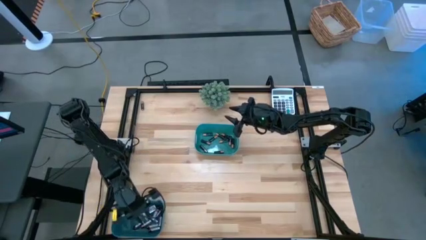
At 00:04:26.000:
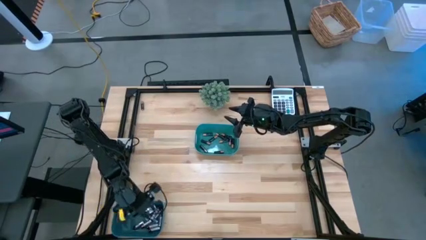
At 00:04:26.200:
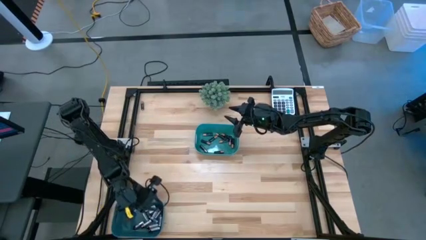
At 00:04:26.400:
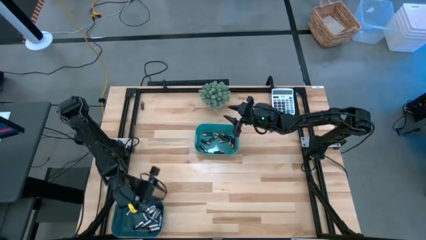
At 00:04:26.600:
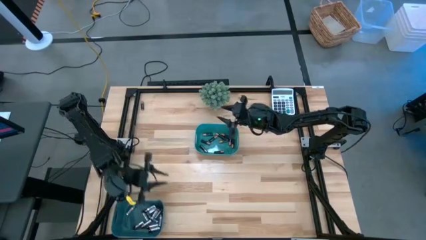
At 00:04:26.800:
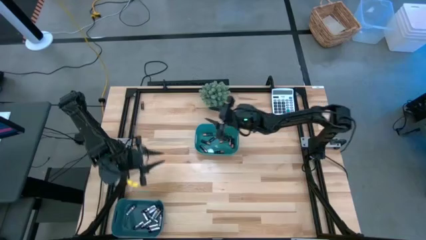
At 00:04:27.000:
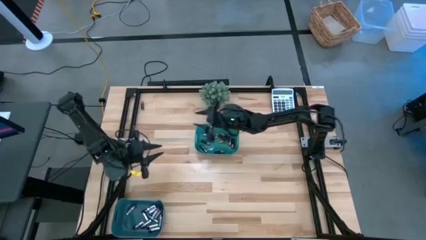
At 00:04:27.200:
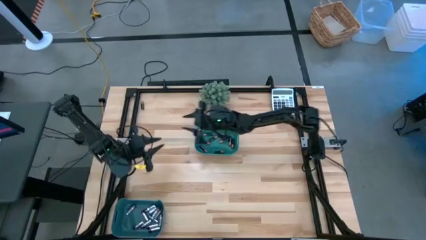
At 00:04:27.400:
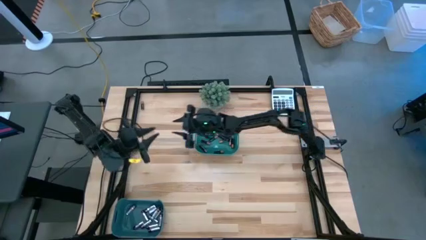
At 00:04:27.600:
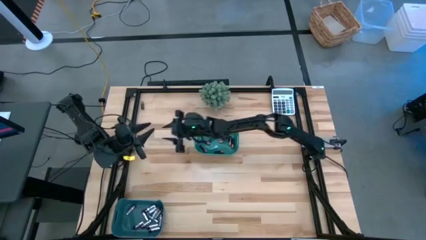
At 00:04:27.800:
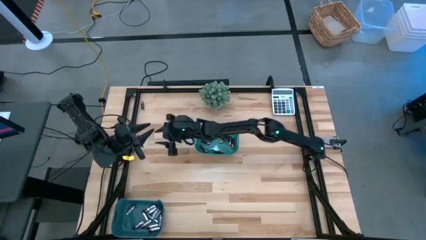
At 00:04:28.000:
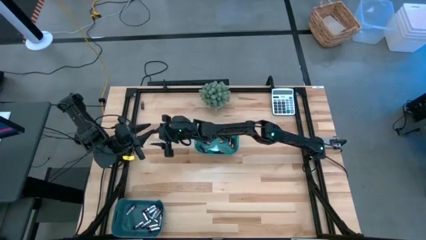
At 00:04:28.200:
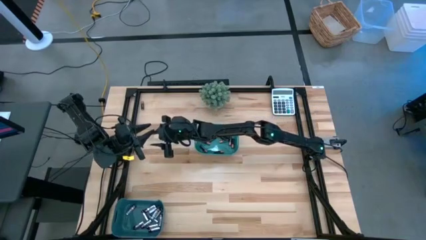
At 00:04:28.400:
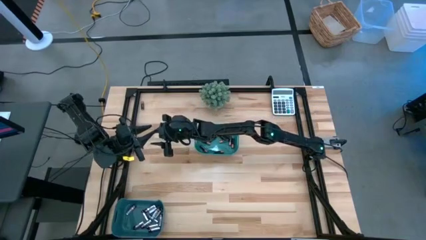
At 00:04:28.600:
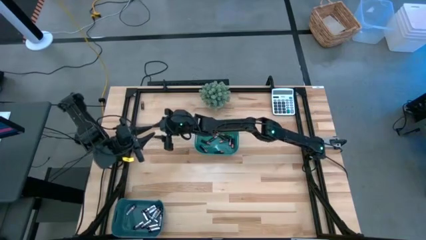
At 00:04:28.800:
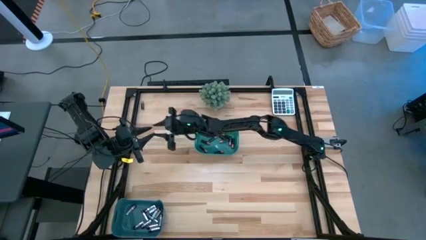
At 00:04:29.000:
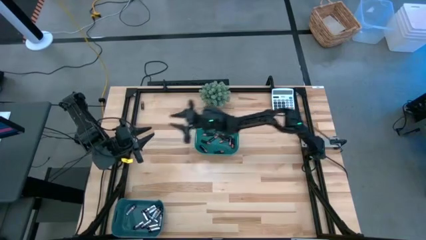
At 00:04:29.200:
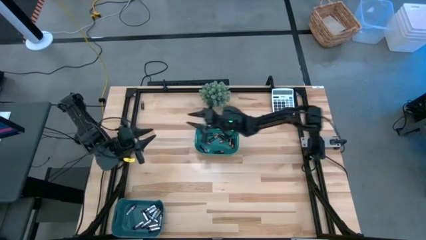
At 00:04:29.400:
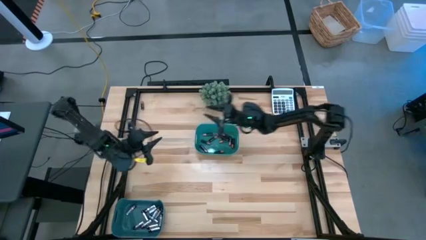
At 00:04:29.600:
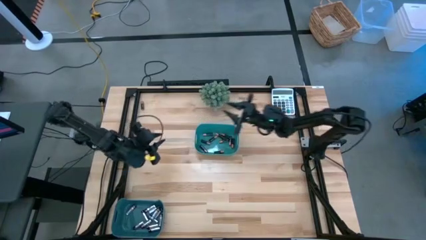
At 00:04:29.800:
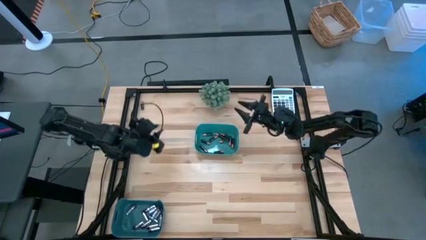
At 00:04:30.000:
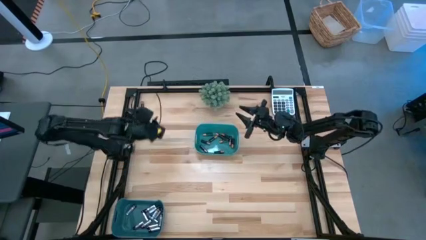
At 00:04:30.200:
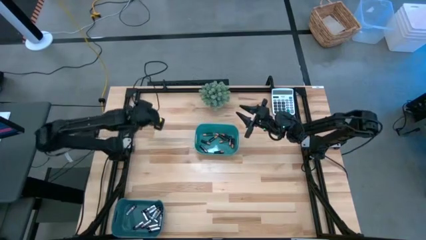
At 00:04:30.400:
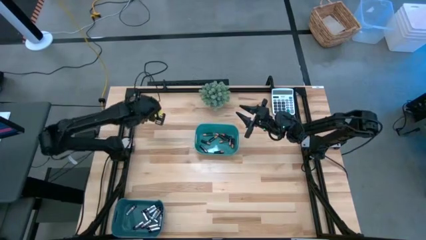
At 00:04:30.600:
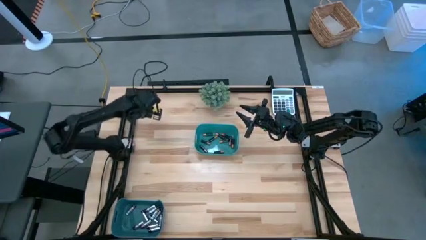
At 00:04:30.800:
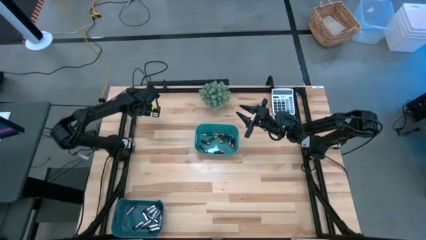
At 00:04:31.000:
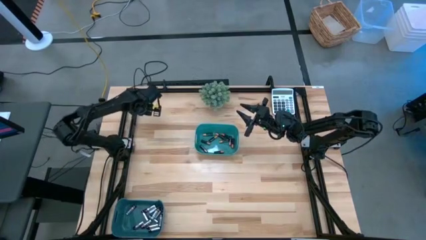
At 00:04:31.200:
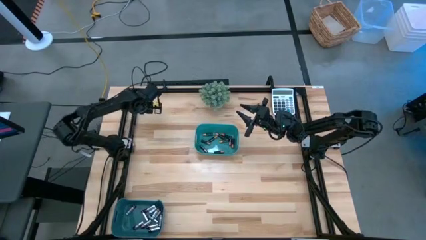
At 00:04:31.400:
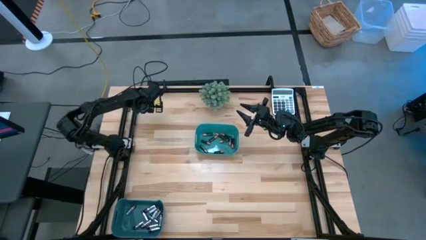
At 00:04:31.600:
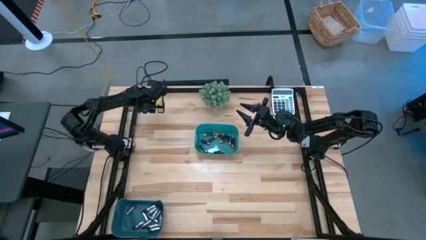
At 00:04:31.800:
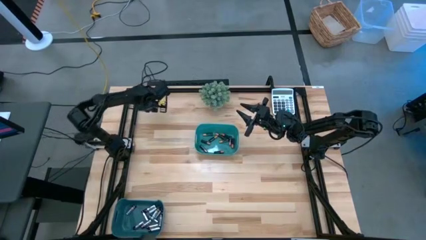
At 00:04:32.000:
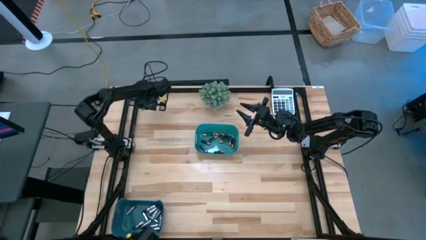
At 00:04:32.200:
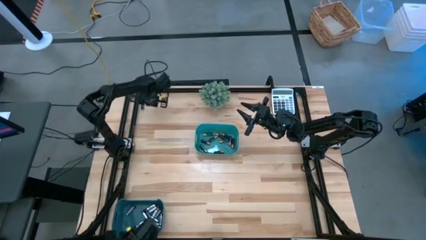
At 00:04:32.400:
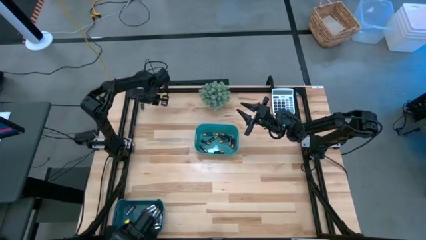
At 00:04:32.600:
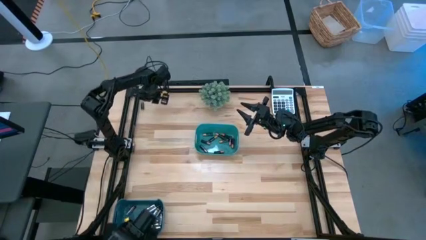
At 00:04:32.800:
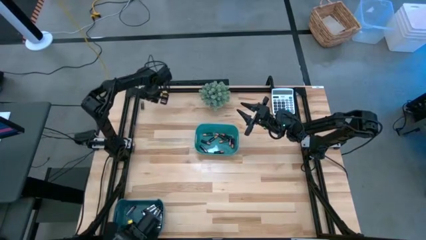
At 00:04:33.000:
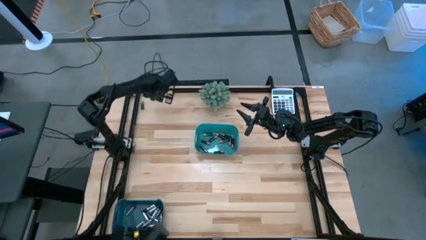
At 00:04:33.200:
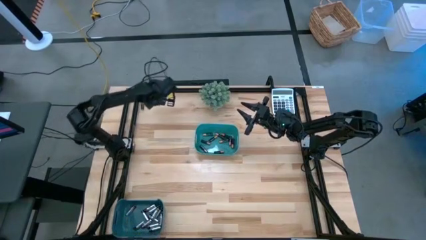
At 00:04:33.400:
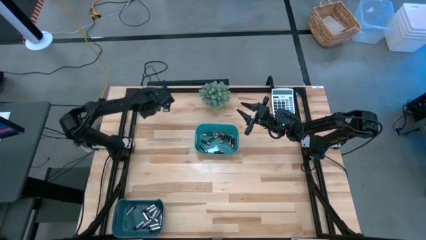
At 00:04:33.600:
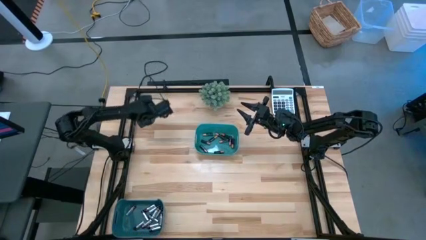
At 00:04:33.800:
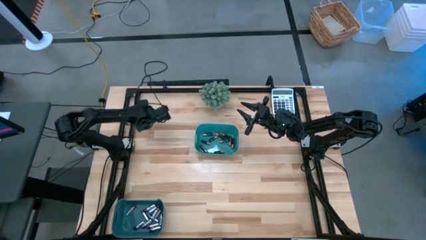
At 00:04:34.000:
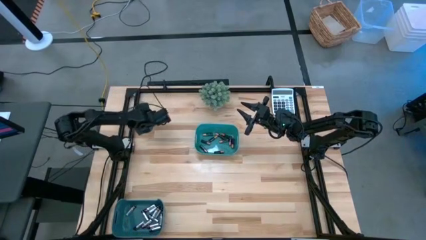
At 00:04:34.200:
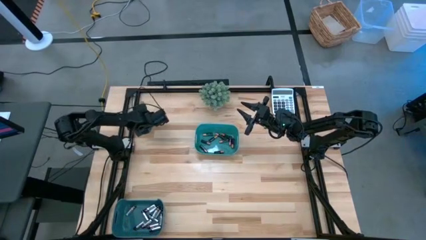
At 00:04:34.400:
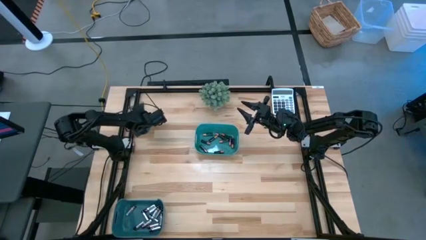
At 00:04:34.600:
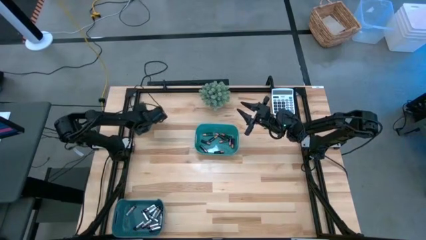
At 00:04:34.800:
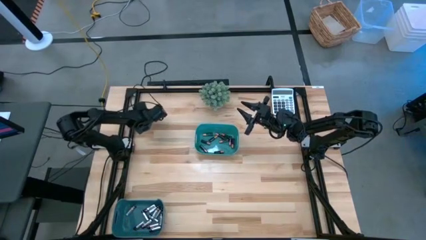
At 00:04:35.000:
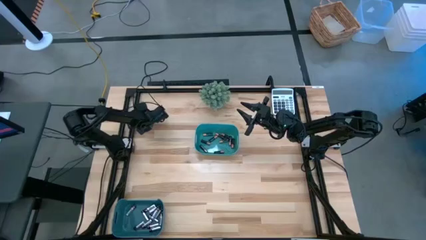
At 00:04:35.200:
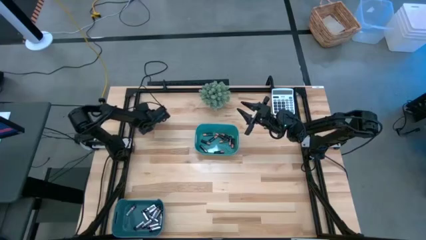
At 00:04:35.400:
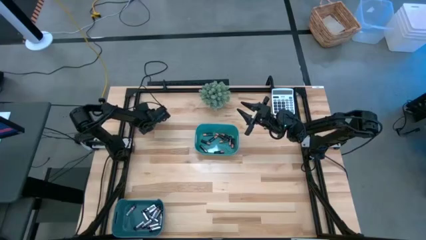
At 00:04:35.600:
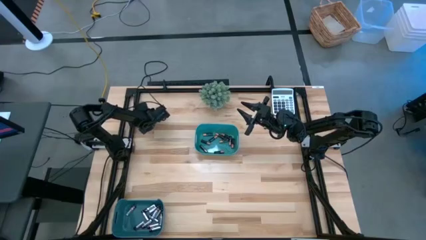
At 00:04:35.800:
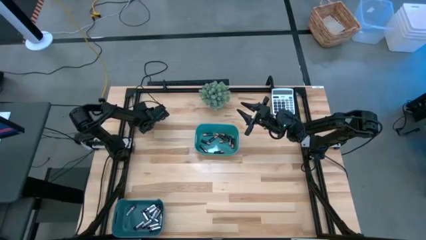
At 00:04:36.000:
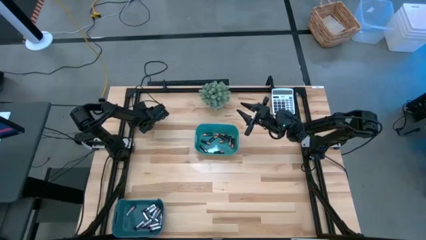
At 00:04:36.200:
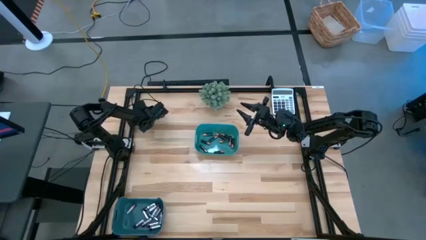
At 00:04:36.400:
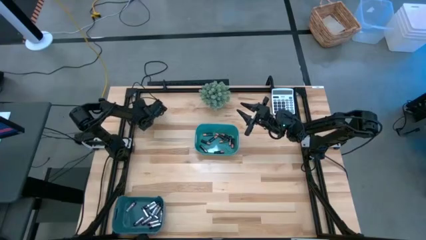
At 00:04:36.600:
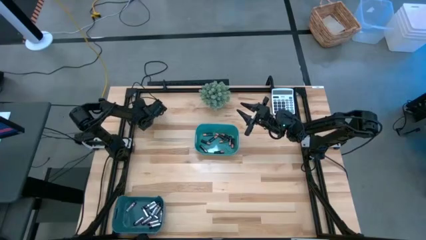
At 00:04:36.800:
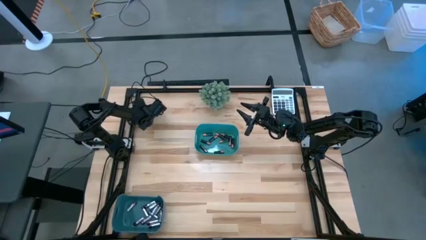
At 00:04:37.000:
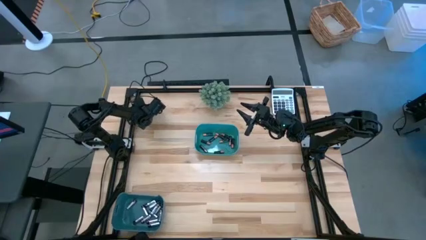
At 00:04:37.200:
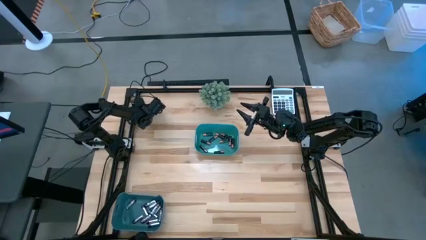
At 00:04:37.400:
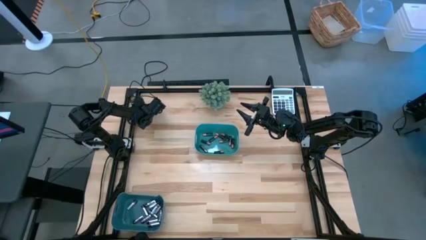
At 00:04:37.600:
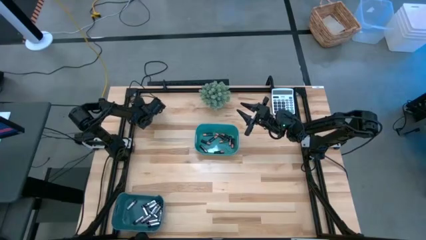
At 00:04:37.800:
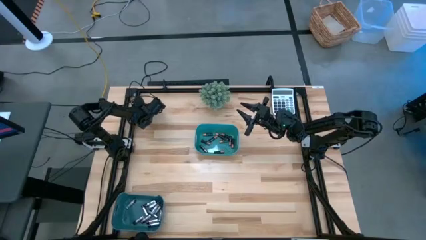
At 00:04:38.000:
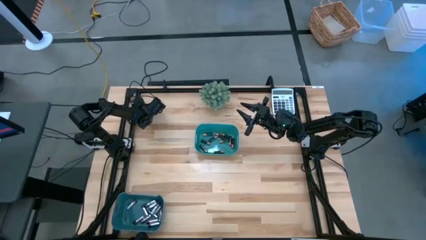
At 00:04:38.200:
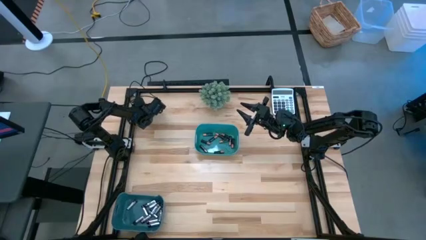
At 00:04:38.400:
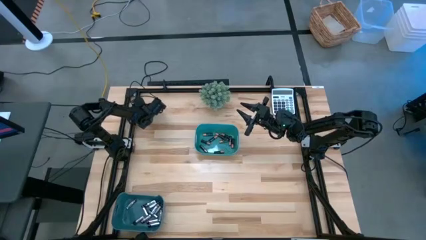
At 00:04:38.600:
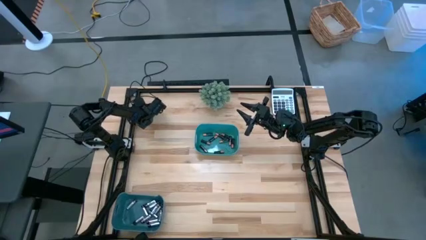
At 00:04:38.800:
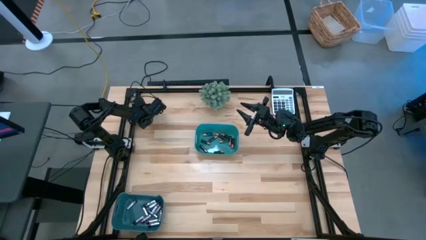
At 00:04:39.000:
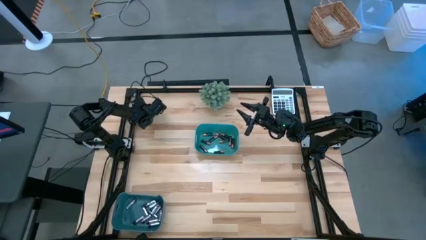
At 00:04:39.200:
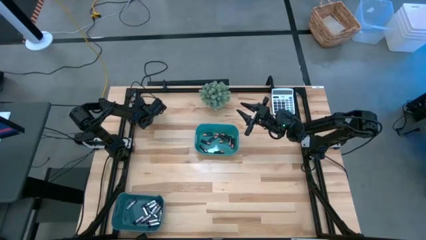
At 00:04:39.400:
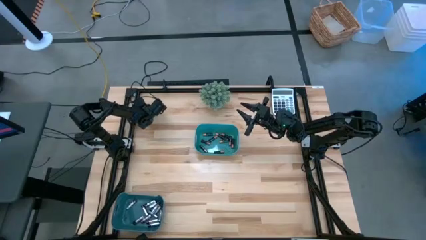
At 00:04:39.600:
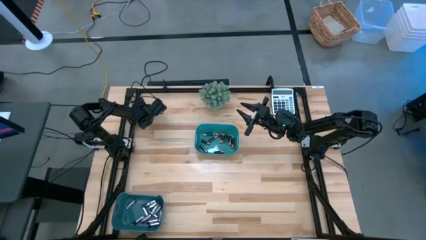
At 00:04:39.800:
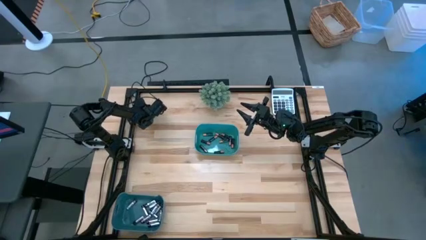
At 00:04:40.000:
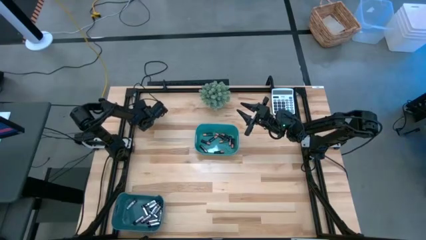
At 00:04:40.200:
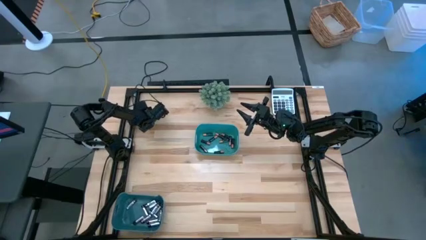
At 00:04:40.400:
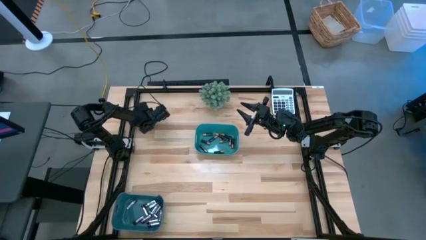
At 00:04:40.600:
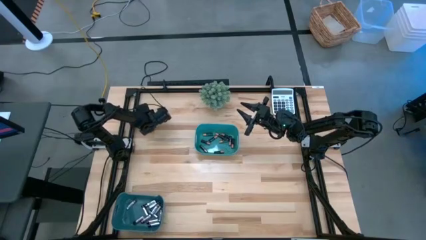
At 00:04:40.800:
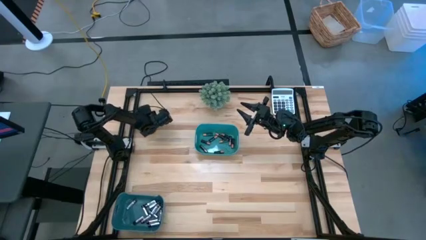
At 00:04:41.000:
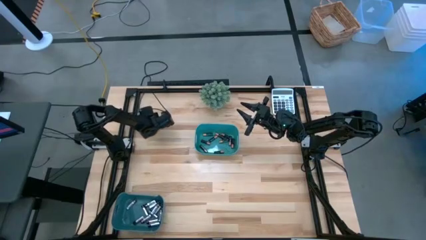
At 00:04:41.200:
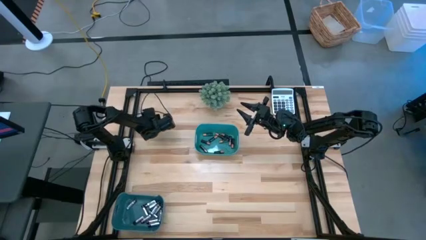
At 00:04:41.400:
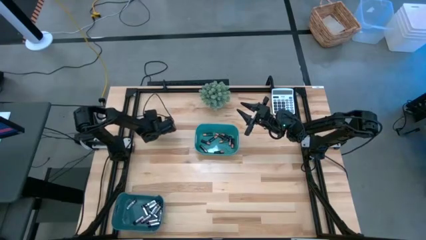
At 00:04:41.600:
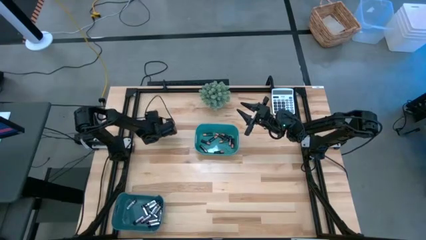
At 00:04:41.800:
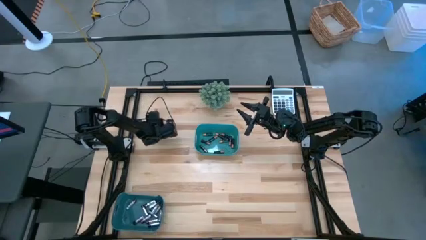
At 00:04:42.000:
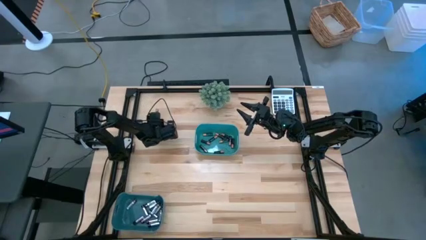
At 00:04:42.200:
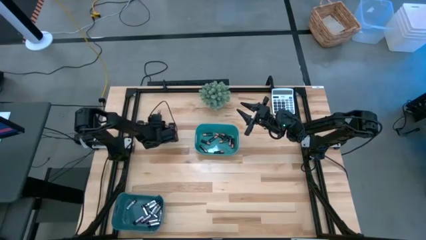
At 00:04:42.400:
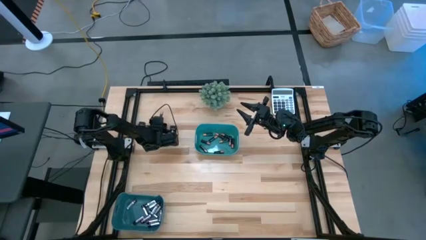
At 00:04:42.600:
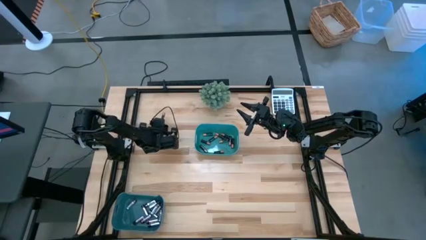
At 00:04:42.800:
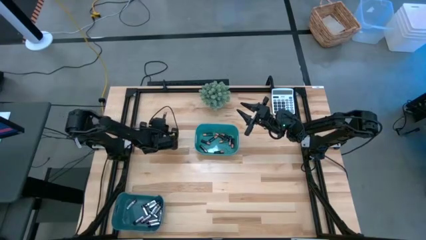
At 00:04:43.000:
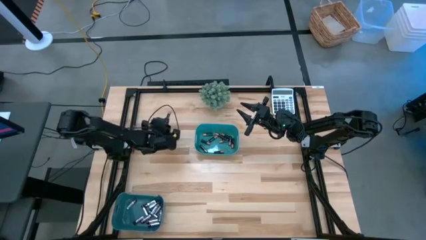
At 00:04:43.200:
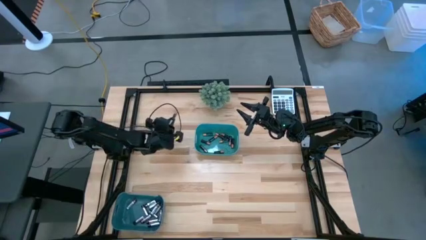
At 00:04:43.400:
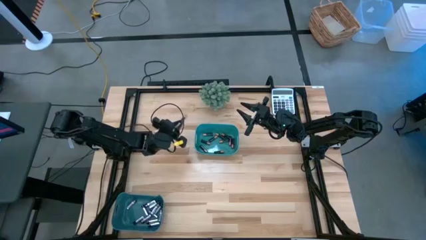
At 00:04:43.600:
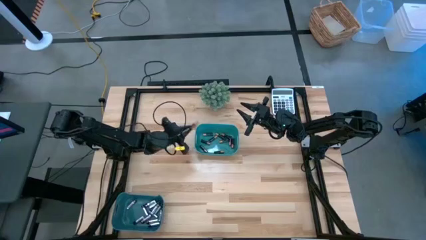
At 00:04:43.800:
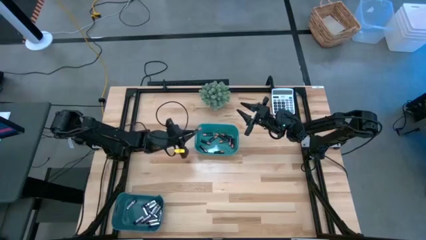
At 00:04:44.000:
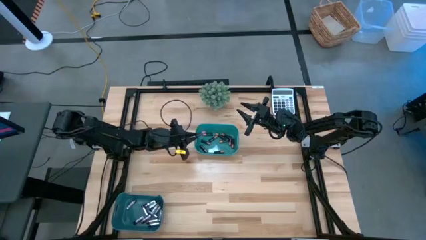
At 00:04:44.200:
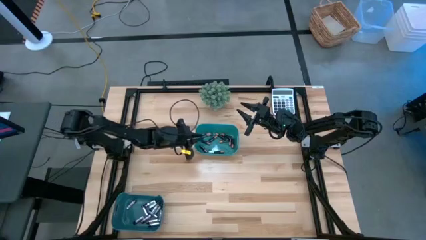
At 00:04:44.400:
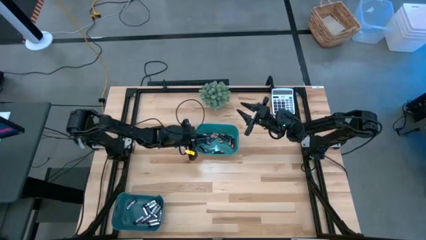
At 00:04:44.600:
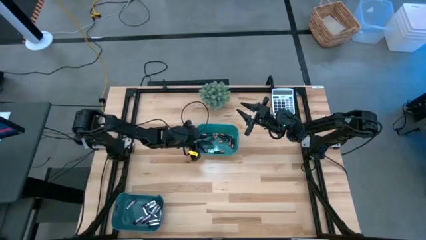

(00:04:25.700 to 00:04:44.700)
Task: Sort batteries
Put the black battery into the green bin
